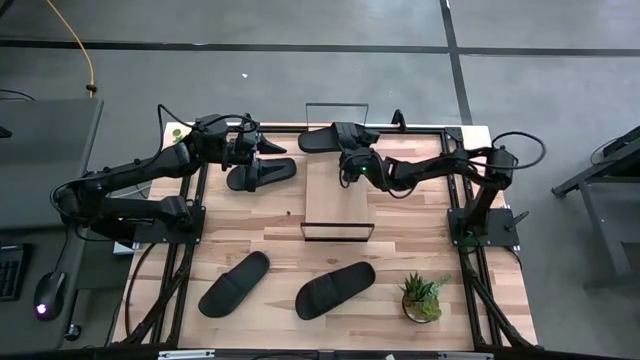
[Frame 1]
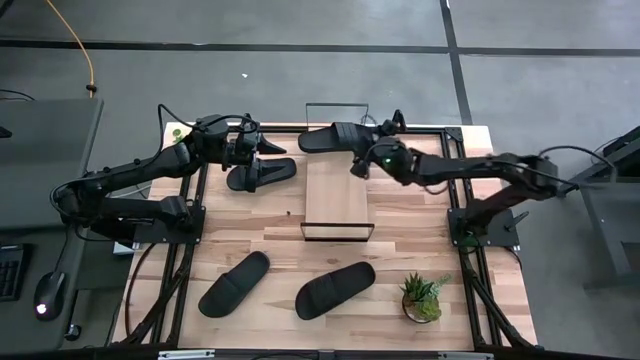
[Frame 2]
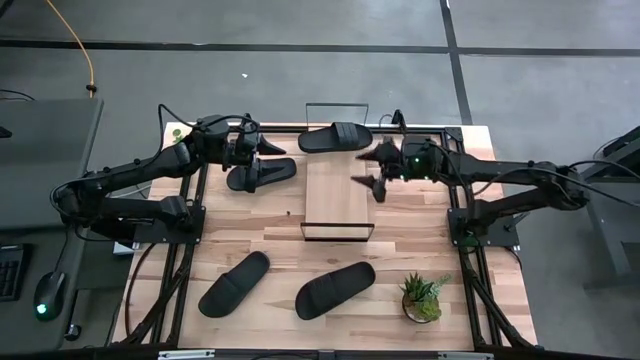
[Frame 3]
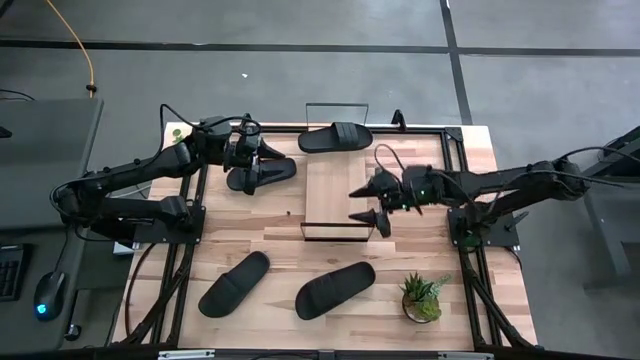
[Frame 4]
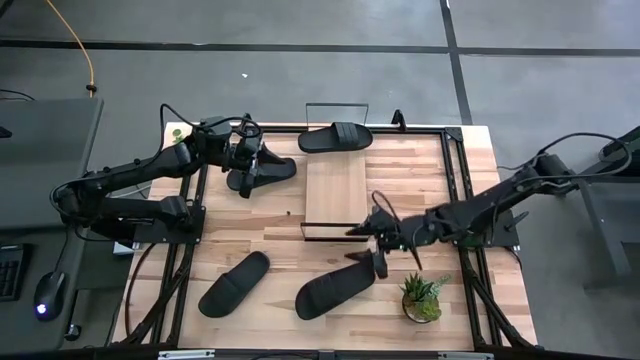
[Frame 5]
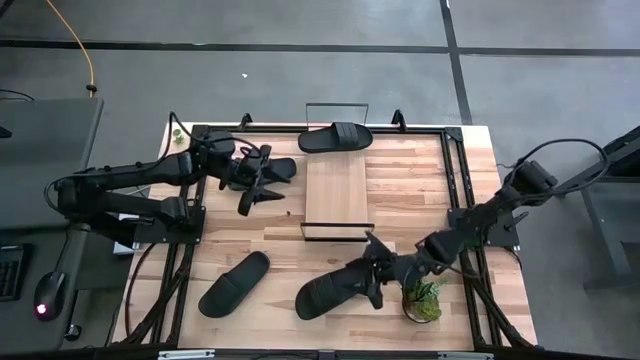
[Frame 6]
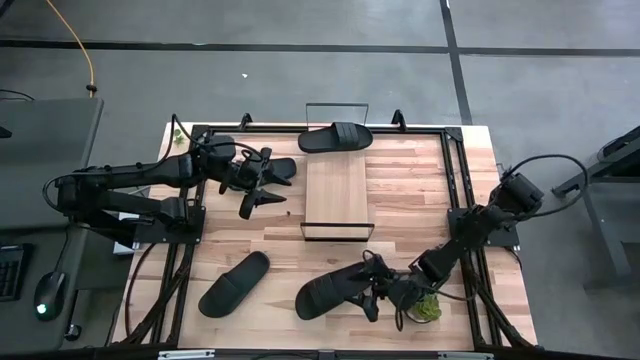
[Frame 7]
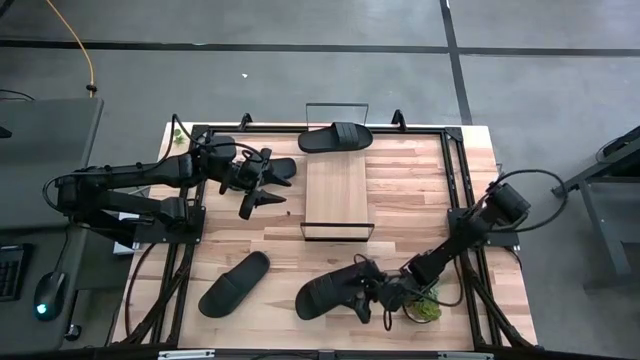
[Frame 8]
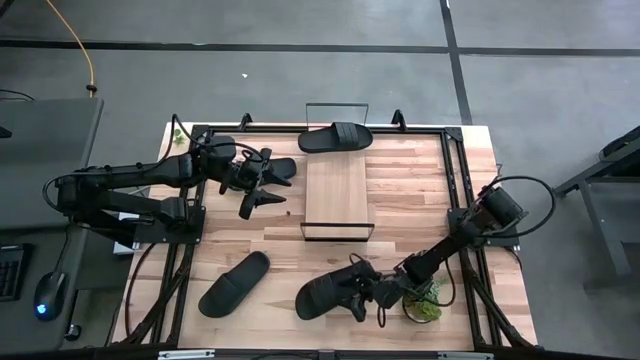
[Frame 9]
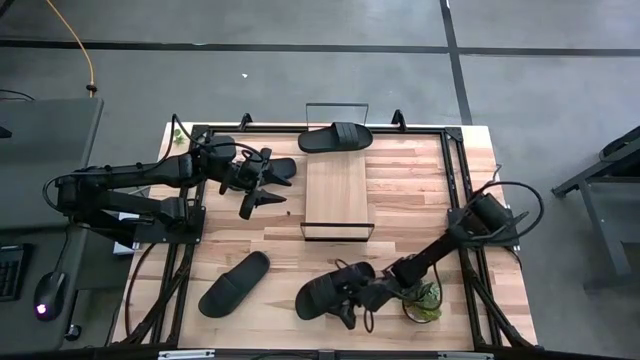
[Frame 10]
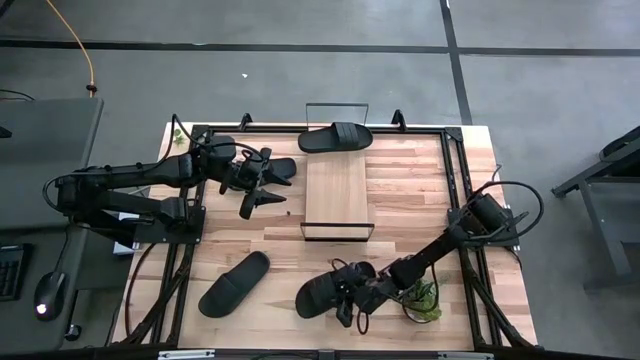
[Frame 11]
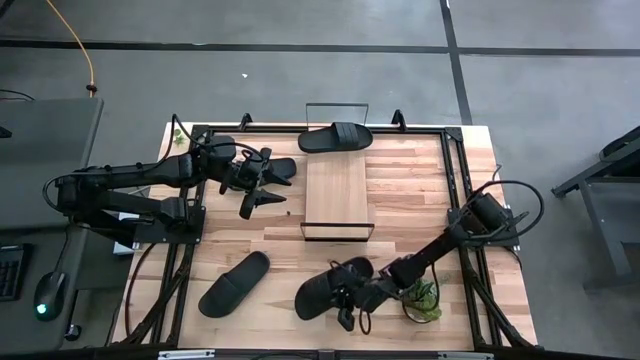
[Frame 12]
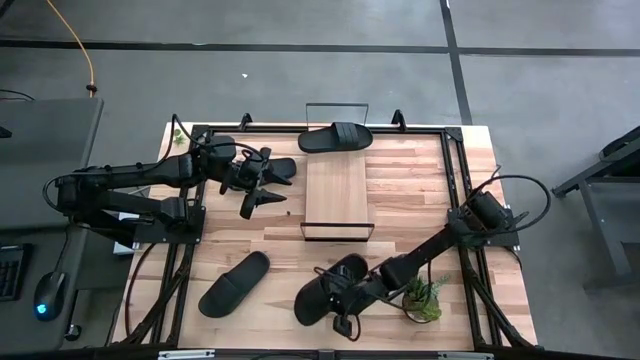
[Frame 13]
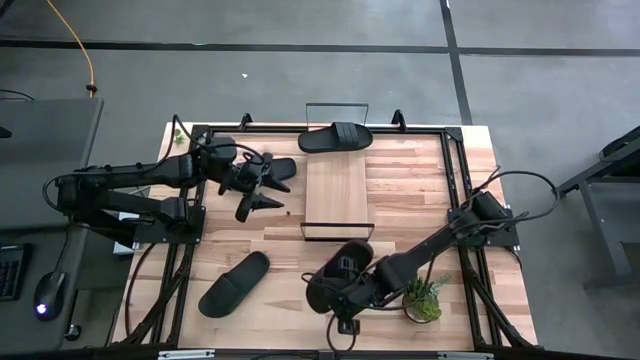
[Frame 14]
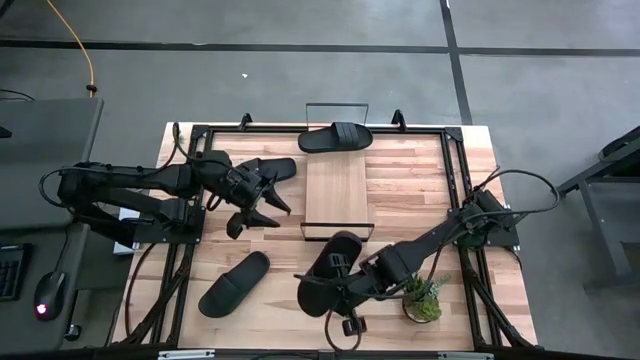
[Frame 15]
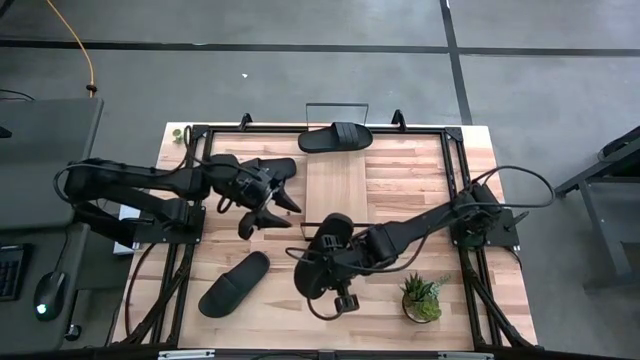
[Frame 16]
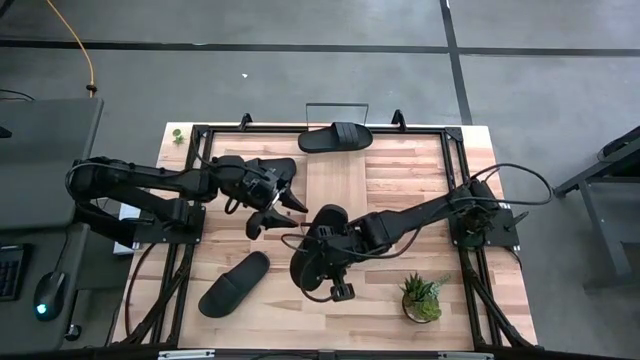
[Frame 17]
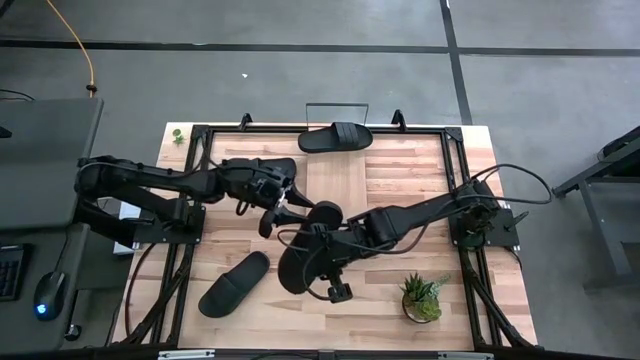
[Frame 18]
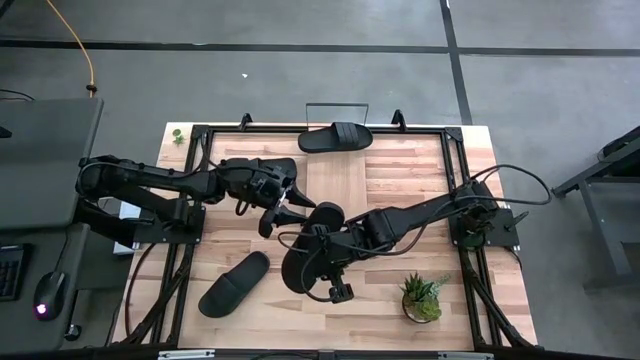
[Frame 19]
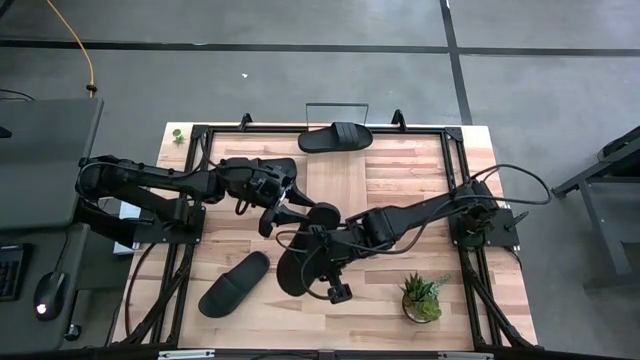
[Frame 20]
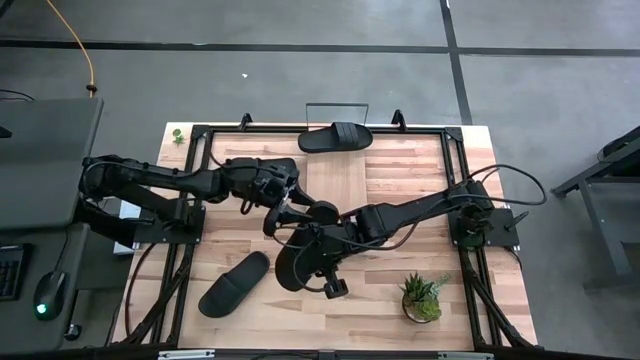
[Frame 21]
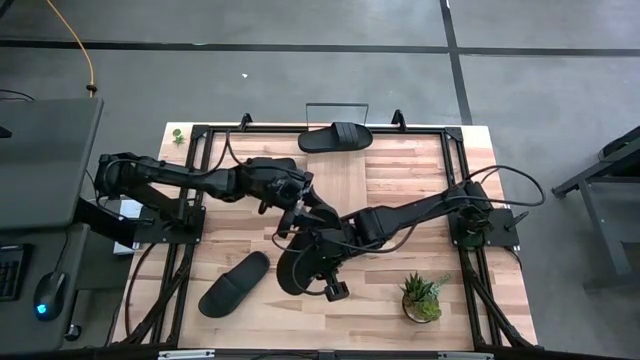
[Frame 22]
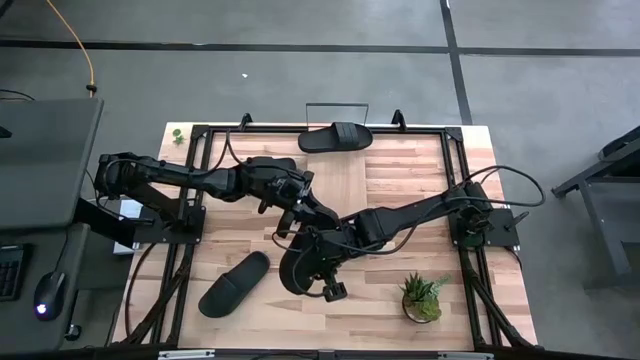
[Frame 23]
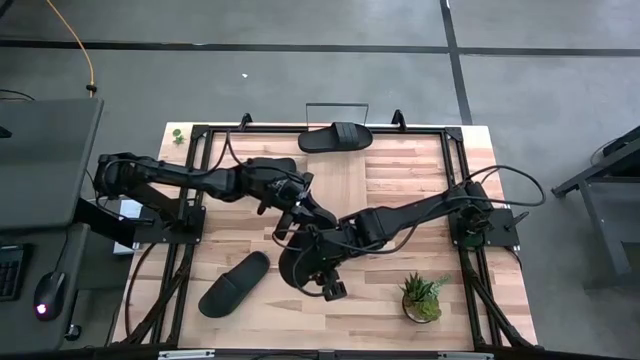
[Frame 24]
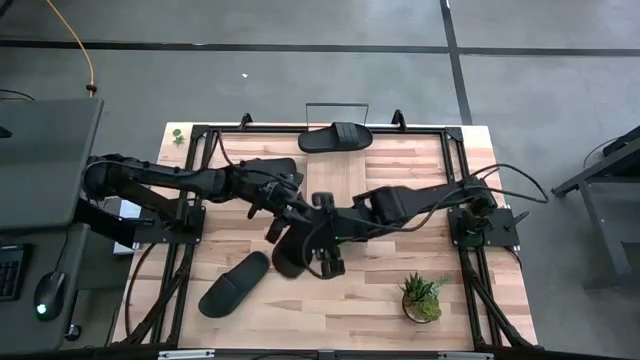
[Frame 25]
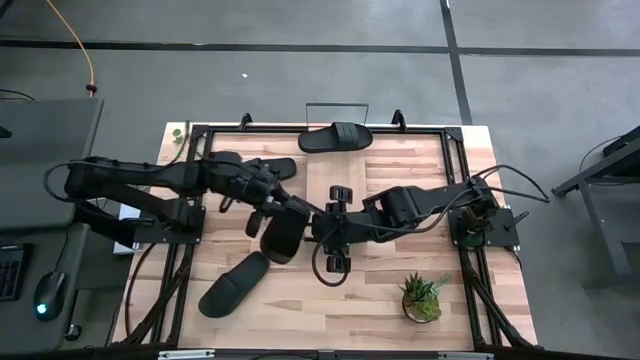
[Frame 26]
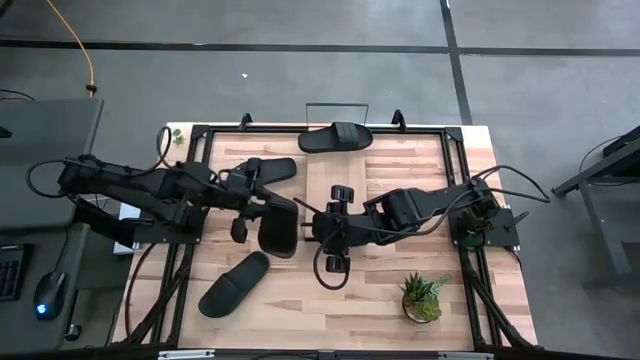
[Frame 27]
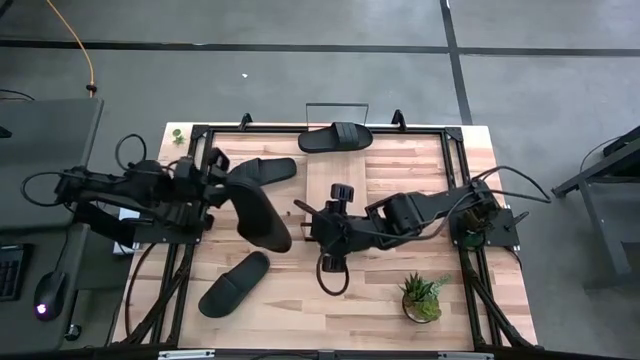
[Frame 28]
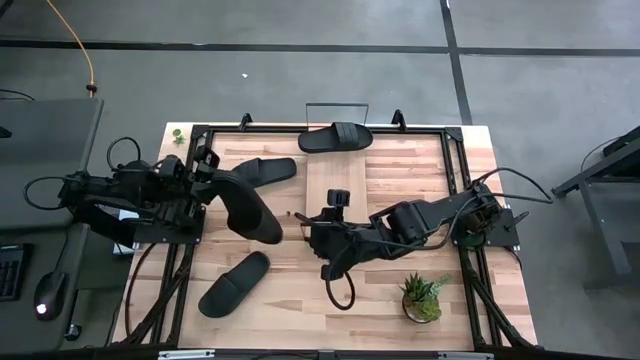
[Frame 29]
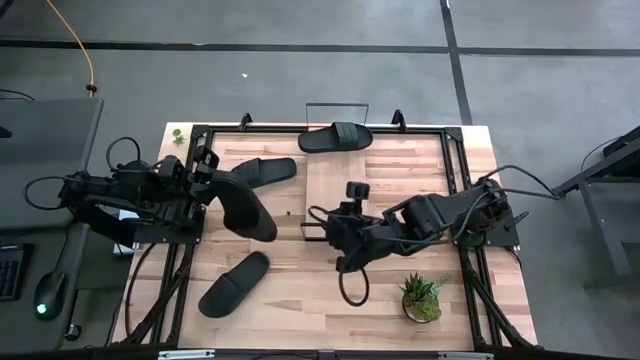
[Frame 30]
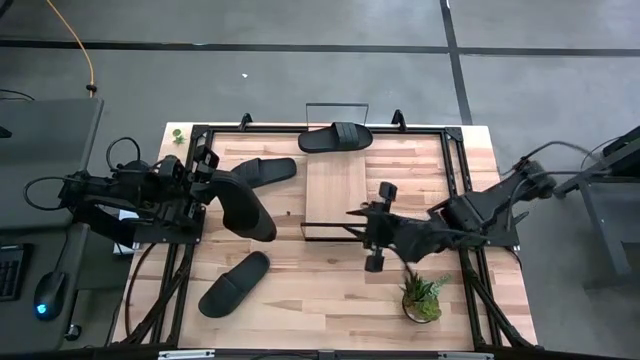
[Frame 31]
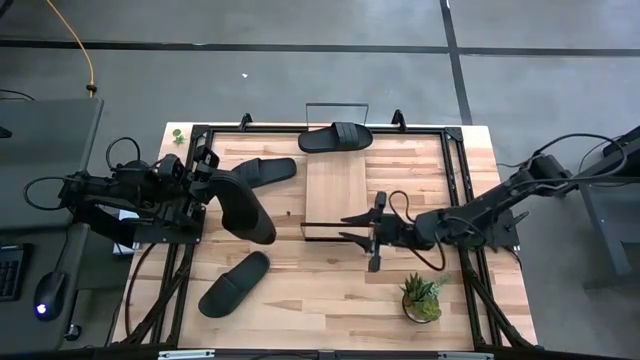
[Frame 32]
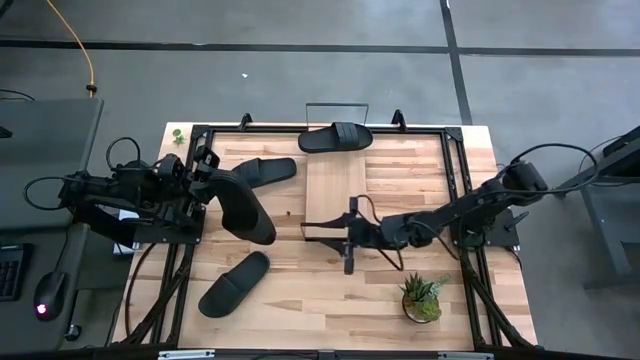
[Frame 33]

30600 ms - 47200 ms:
Task: Pick and place slides into the shelf
Put the black slide on the shelf

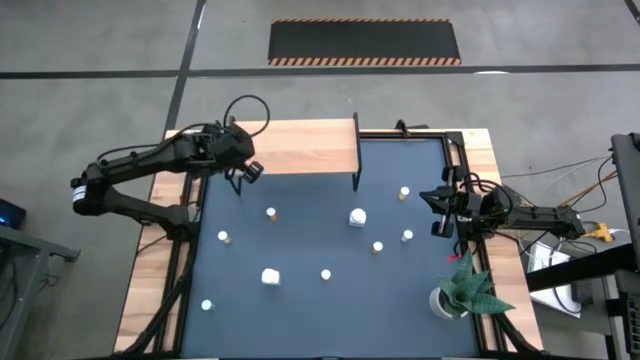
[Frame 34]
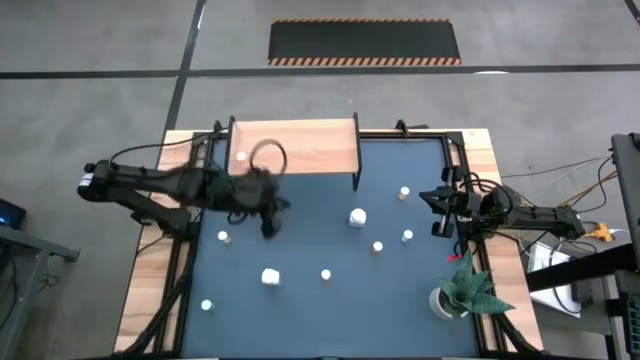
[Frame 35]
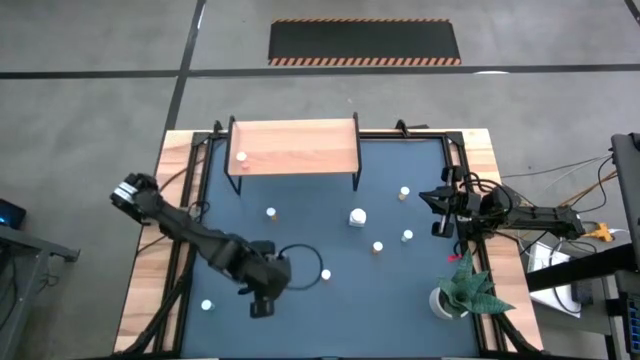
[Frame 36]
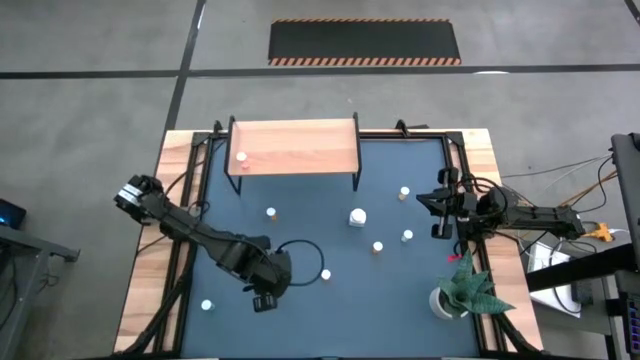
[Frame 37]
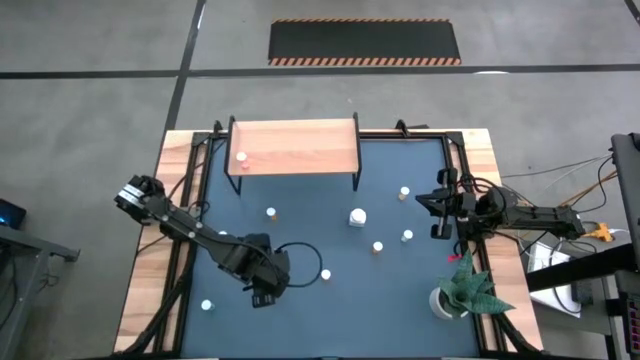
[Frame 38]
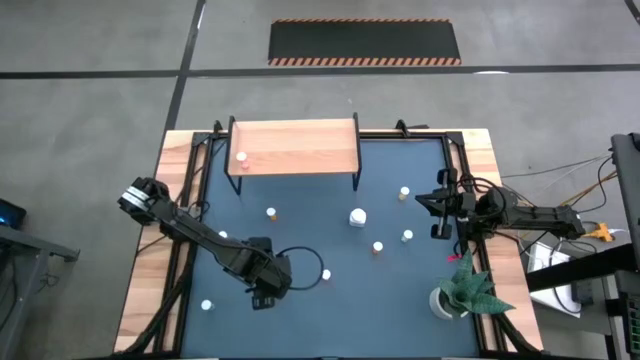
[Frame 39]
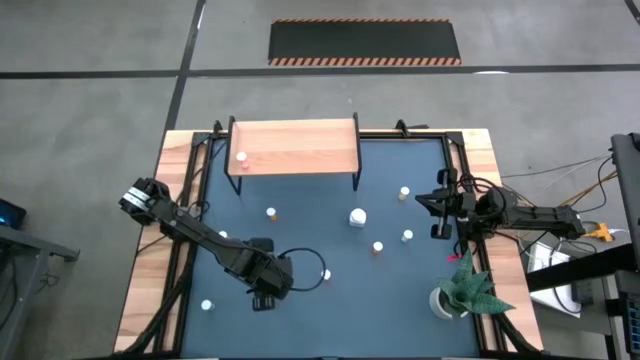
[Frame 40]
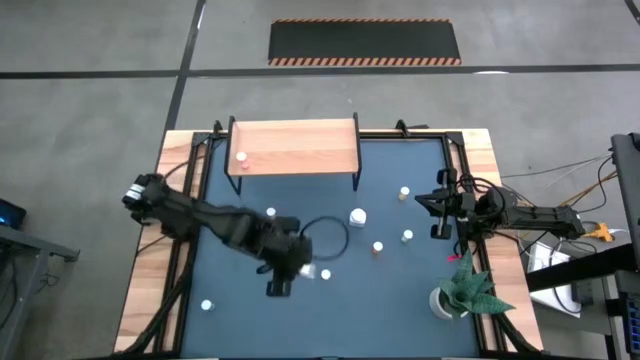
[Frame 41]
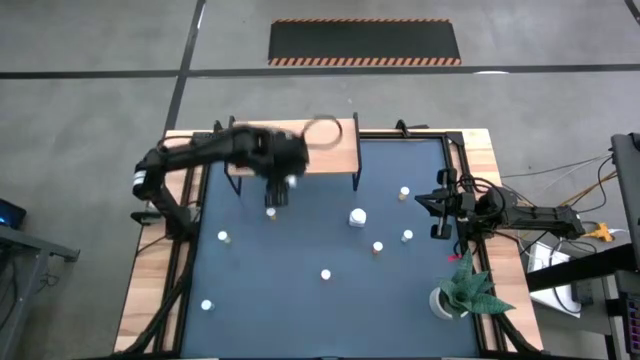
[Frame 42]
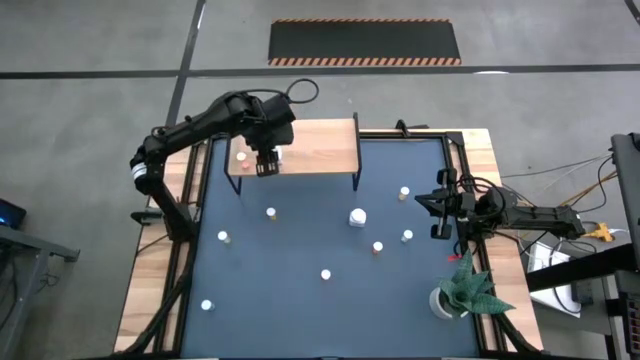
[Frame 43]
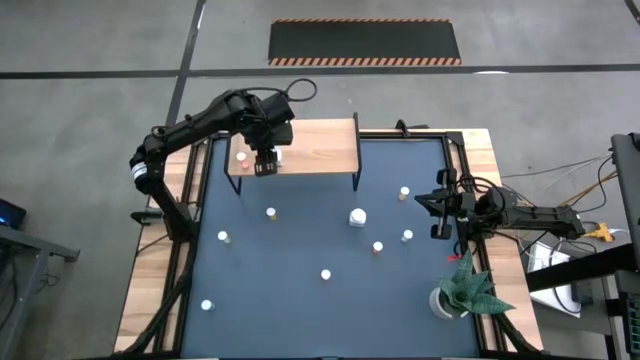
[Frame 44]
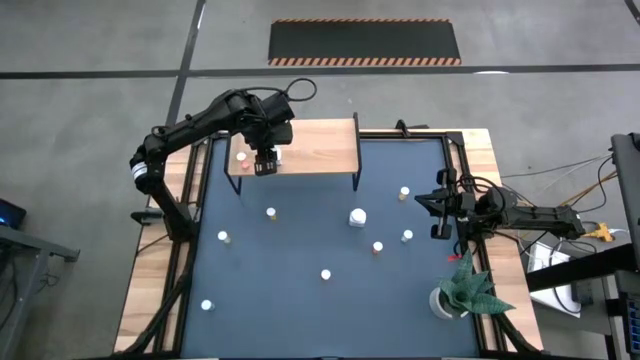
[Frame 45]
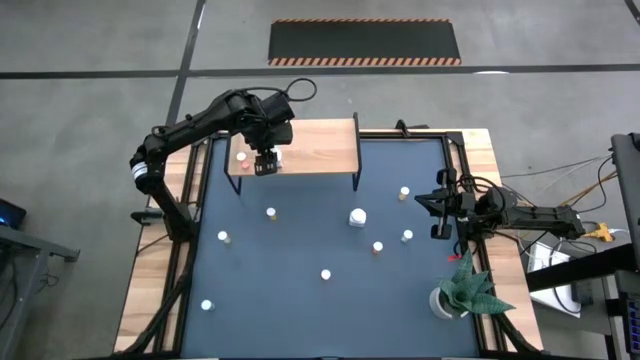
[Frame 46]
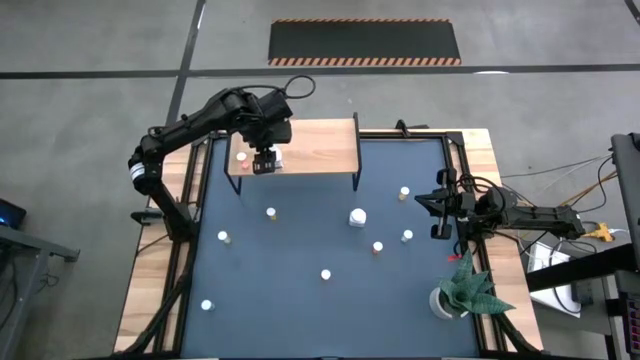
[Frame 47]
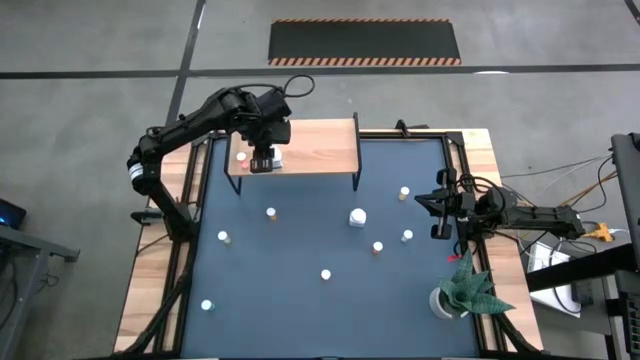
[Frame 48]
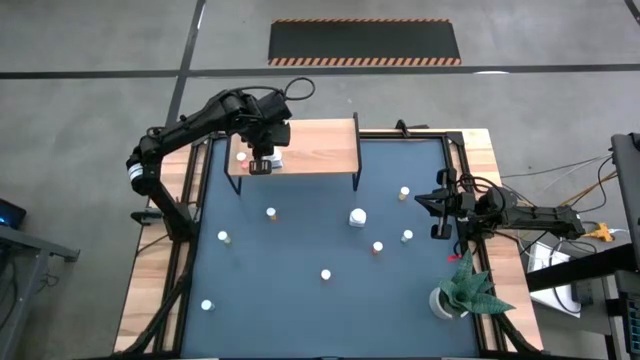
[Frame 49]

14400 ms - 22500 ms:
Task: Pick and place medicine bottles onto shelf by color
Put the bottom white pill bottle on the shelf
